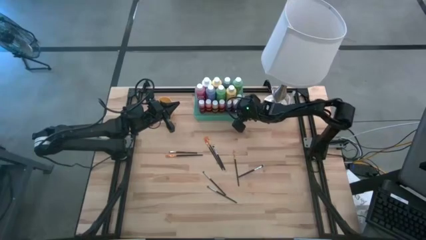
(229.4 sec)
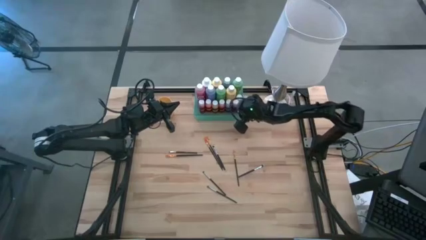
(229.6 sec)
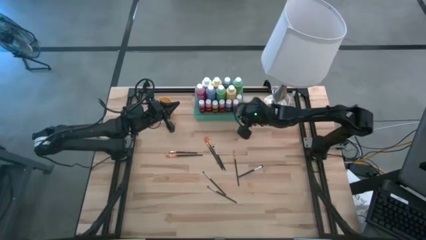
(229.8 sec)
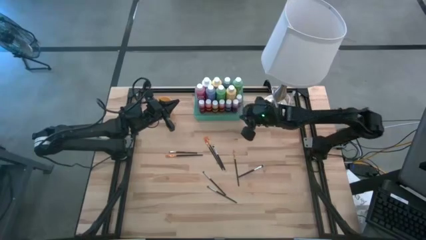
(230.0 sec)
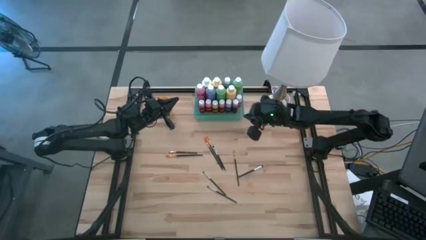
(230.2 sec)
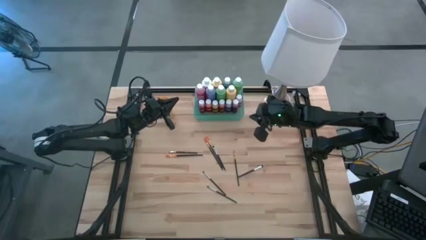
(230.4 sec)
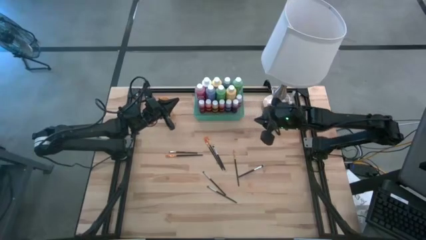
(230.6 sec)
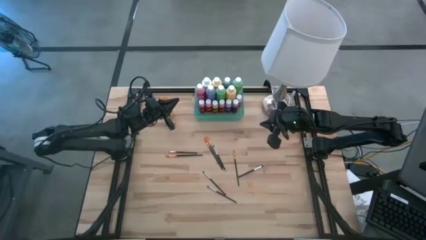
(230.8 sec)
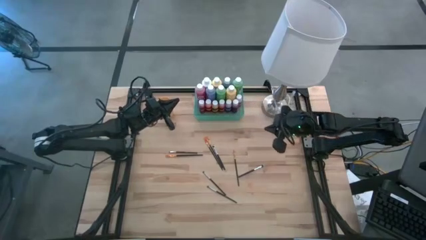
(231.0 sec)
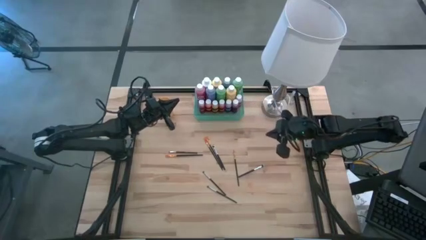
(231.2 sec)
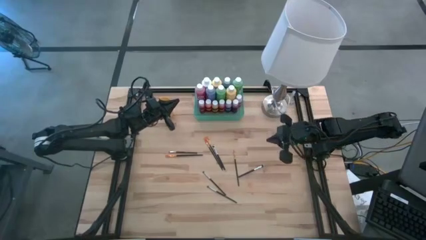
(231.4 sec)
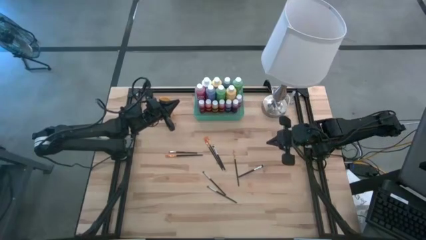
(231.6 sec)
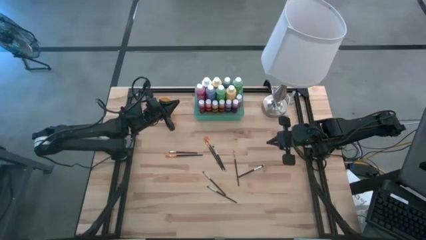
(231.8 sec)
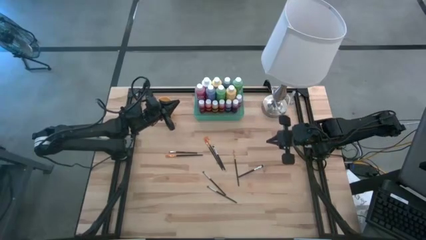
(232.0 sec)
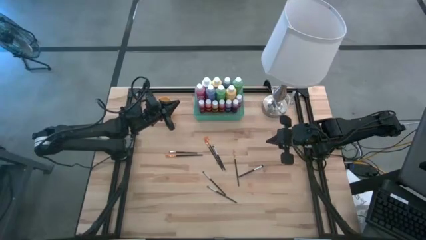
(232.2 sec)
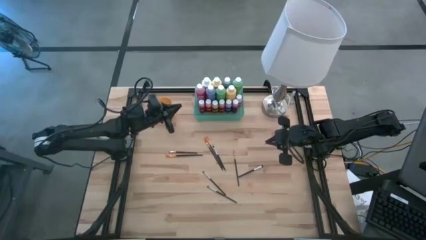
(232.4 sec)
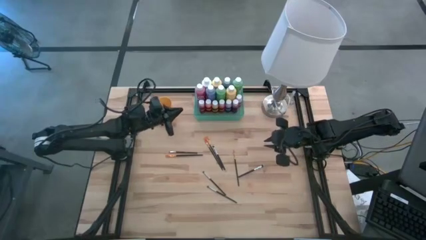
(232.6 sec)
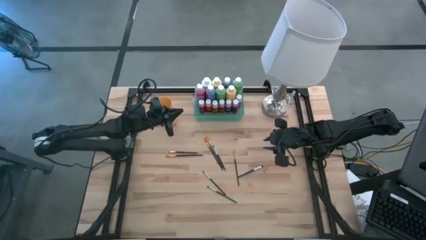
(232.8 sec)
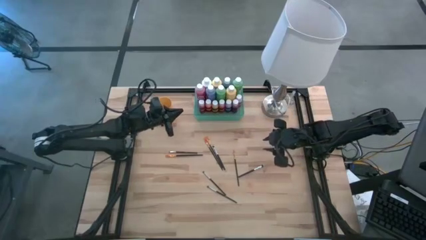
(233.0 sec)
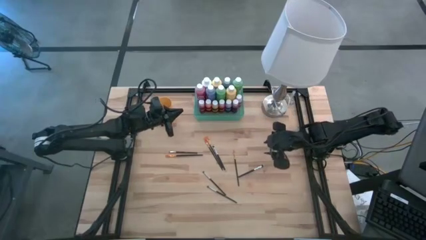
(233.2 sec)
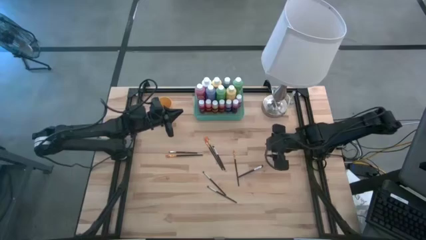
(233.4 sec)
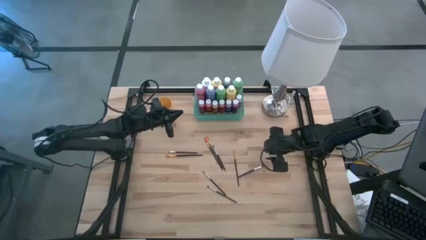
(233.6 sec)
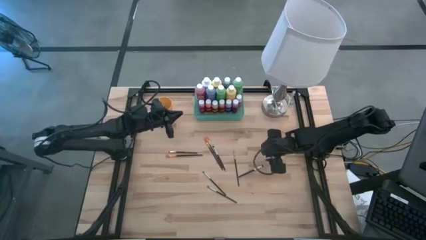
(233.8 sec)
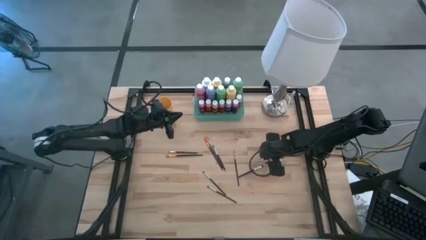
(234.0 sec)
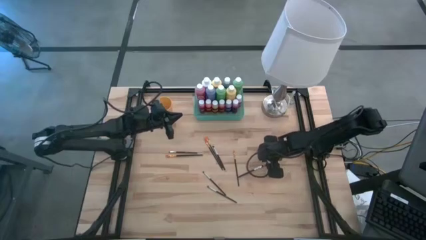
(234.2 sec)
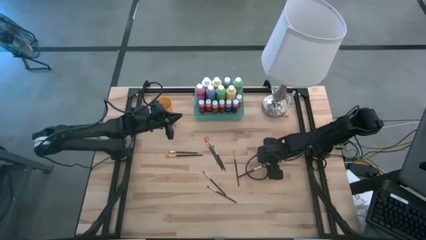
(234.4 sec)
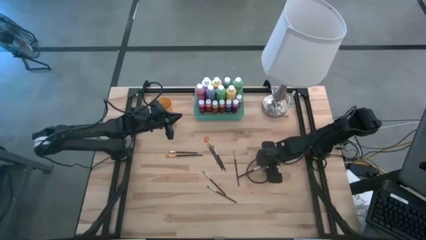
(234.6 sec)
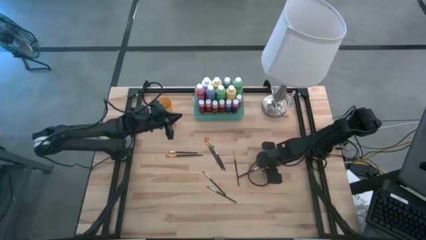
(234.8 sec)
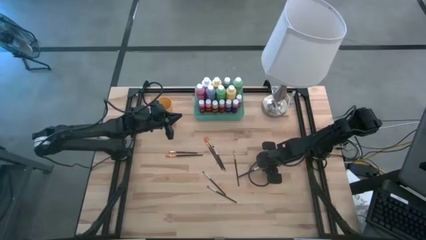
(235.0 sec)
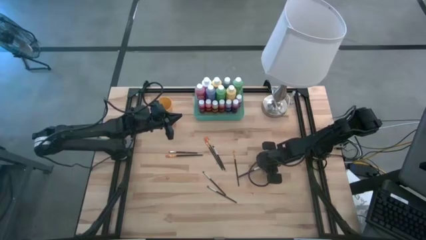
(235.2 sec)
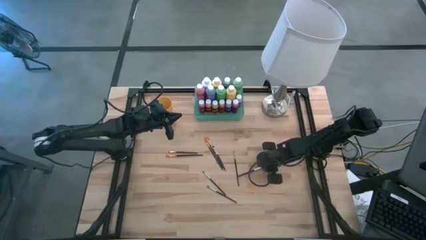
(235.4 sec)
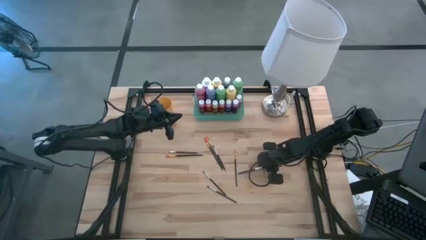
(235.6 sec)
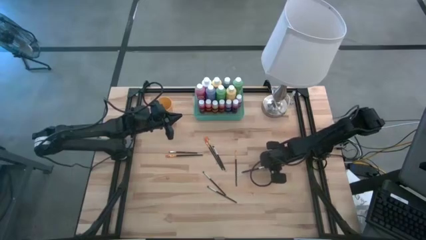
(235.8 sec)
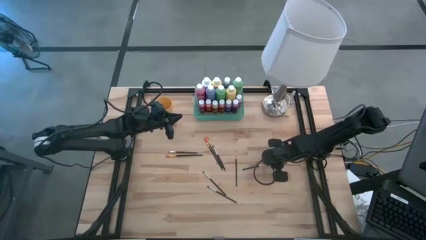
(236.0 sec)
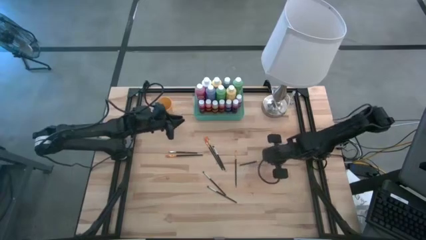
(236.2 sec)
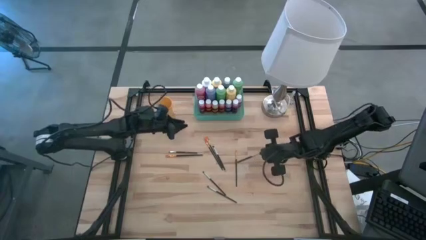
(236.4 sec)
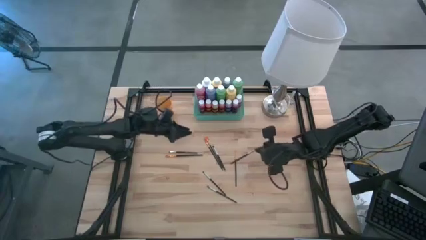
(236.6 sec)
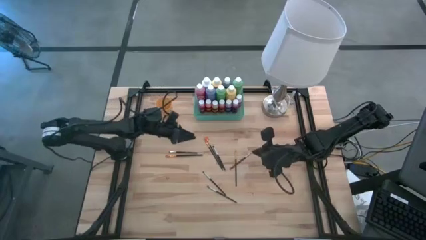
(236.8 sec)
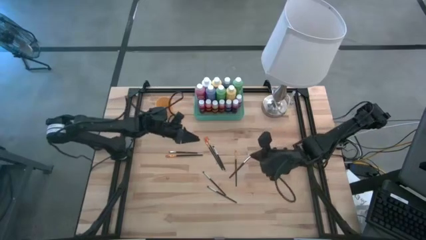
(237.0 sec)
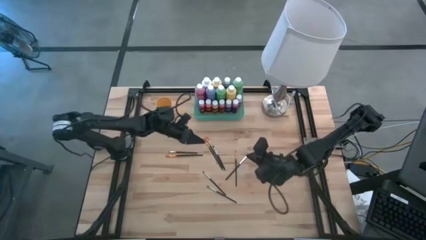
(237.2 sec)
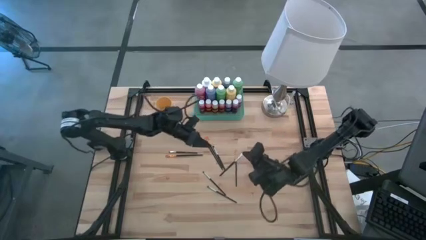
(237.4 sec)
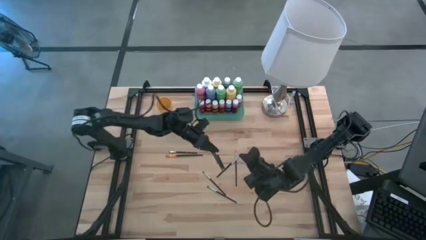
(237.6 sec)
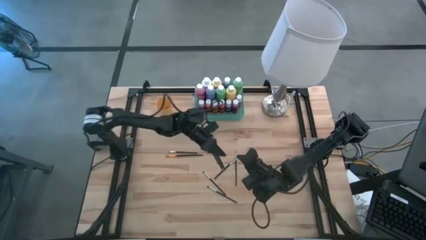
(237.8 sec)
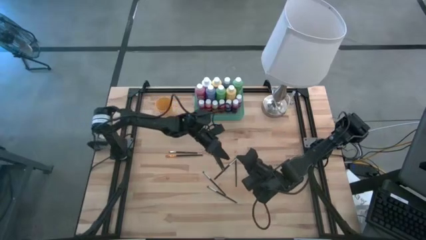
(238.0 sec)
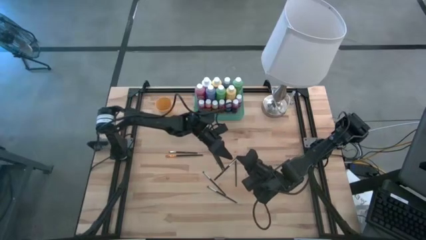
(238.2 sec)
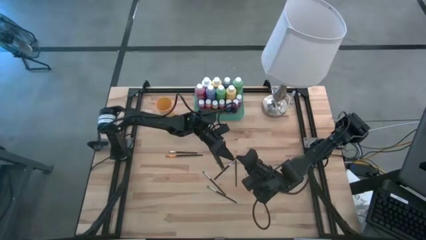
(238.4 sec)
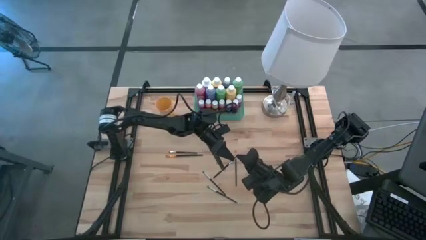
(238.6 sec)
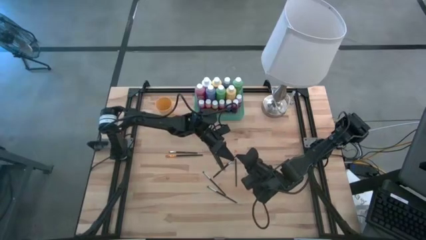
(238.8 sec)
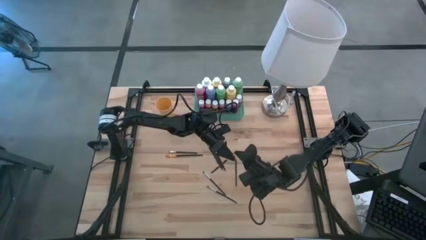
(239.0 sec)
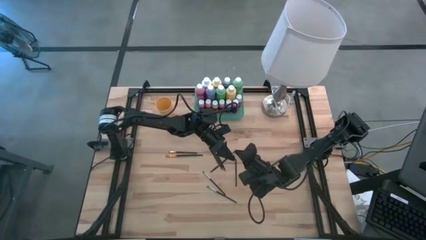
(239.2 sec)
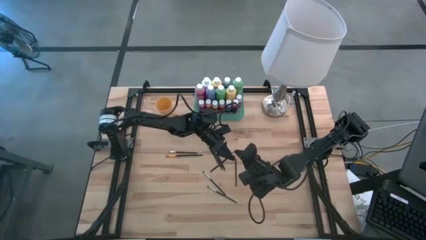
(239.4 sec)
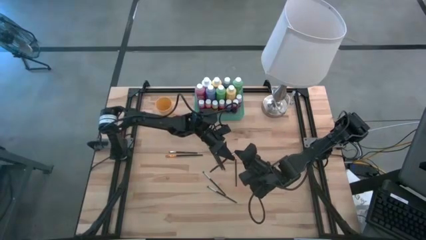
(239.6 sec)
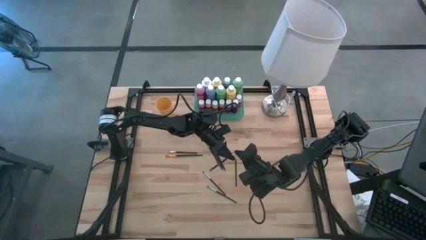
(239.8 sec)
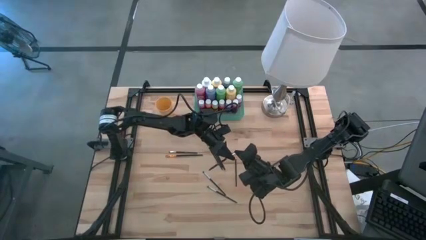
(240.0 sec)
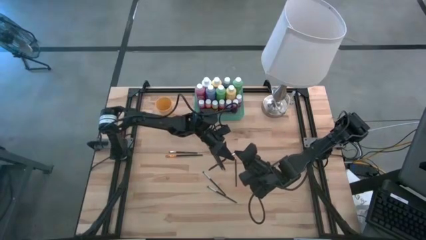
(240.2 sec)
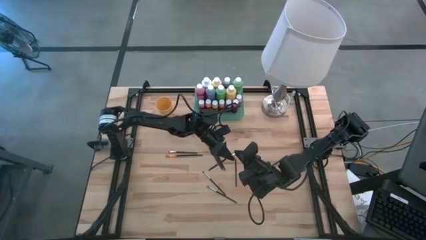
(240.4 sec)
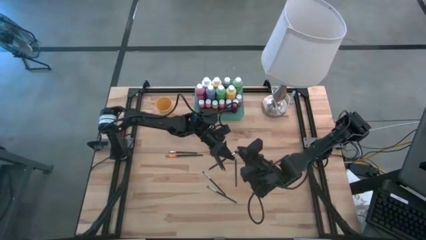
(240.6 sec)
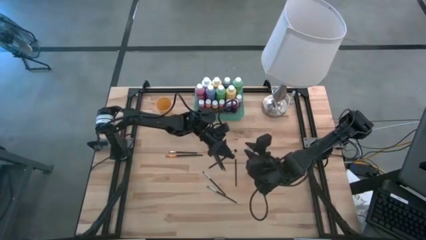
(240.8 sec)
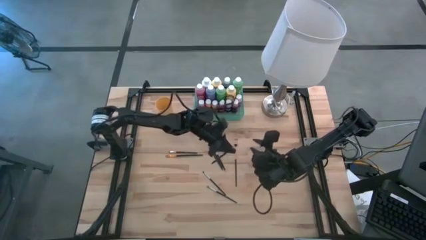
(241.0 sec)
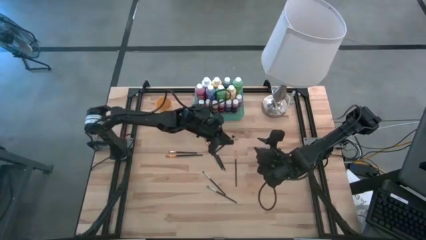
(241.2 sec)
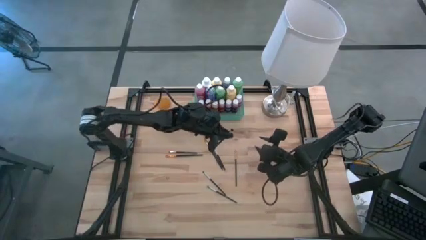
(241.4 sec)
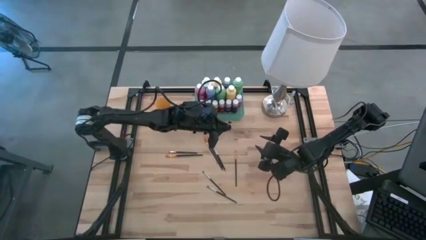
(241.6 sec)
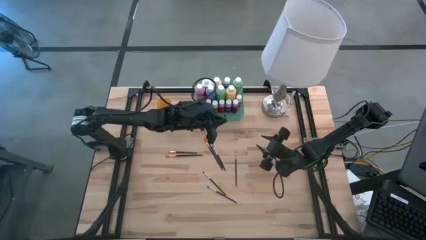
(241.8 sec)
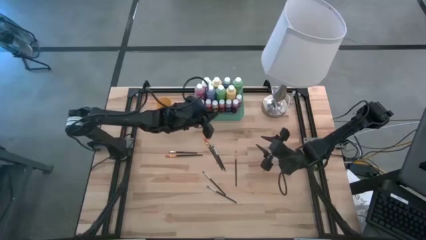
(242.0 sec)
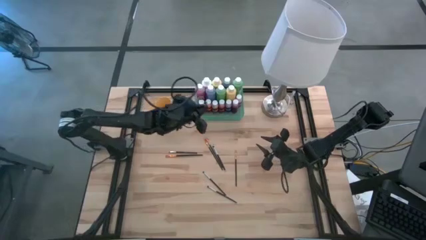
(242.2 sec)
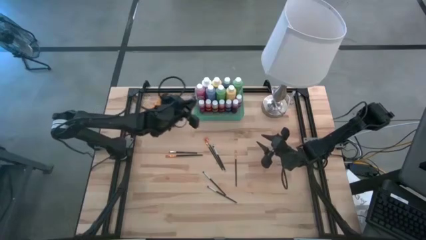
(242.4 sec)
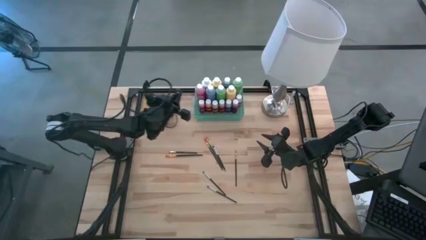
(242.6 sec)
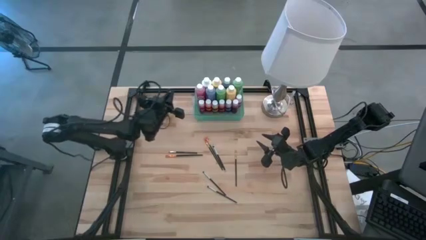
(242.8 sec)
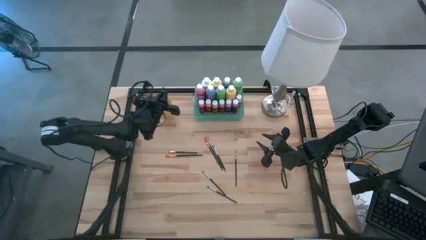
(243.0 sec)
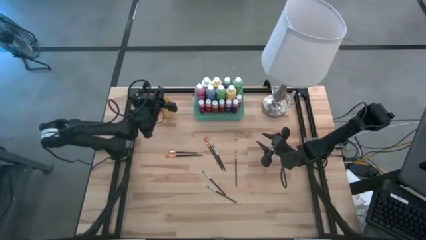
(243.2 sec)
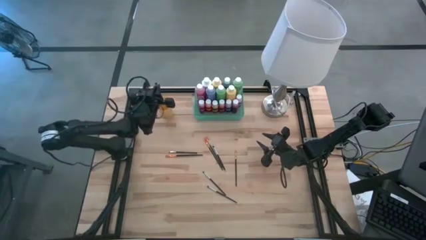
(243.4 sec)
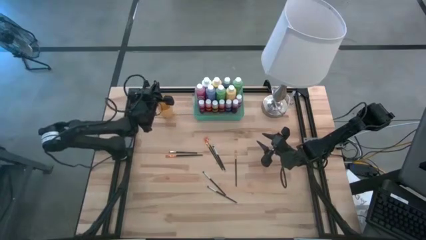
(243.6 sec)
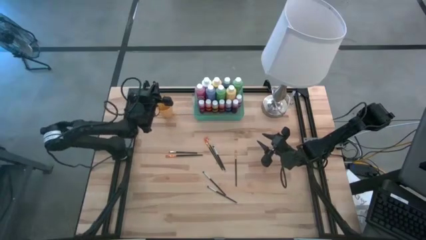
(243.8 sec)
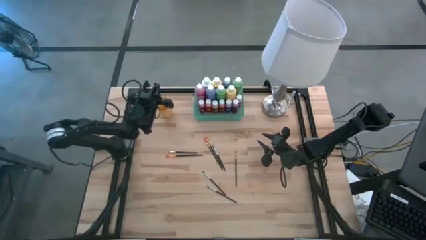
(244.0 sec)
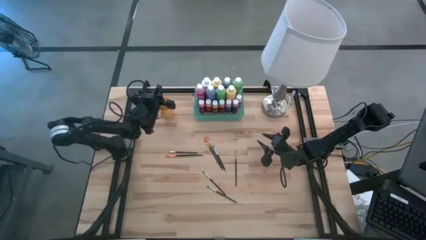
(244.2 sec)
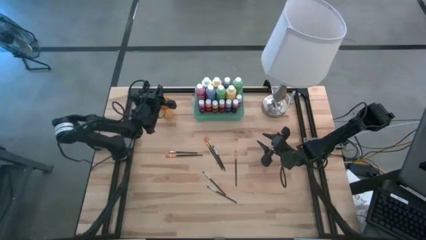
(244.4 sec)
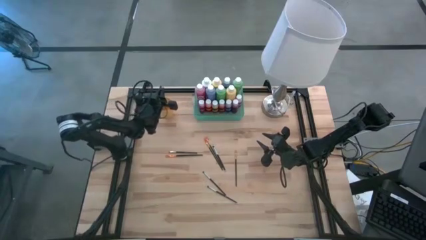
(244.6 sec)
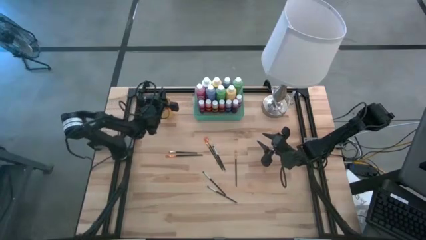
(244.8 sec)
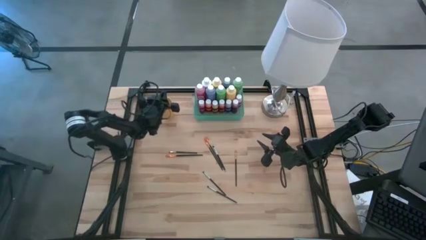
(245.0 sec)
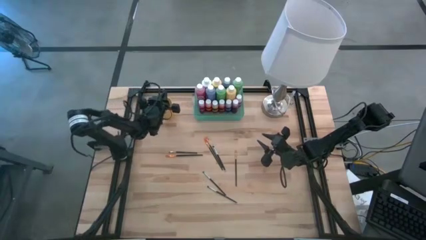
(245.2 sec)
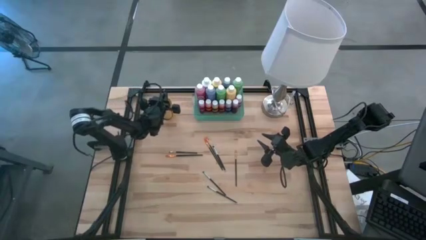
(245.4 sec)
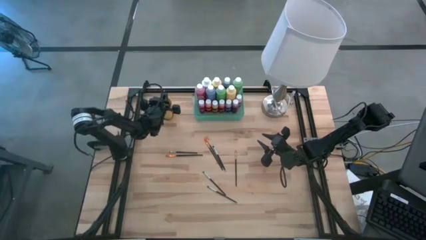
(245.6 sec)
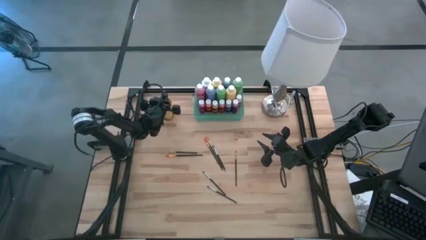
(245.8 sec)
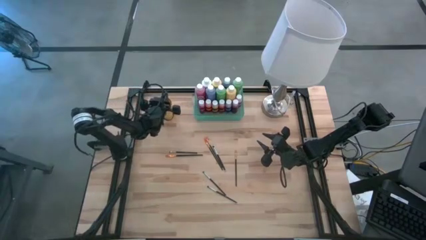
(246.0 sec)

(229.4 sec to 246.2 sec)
Task: Pick & Place Paint Supplies
Put the silver paintbrush into the orange cup
